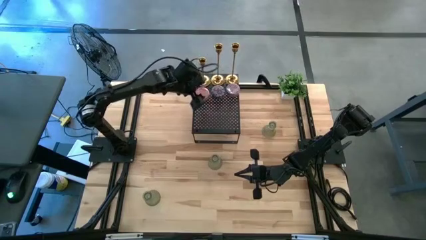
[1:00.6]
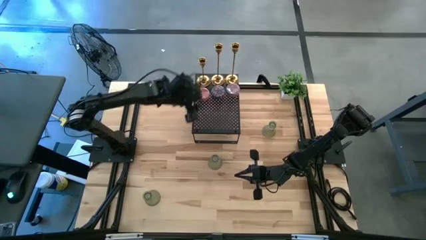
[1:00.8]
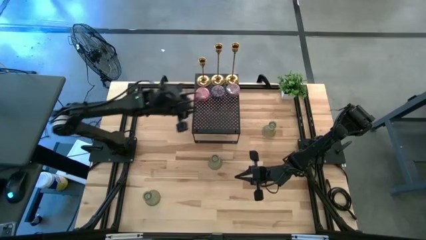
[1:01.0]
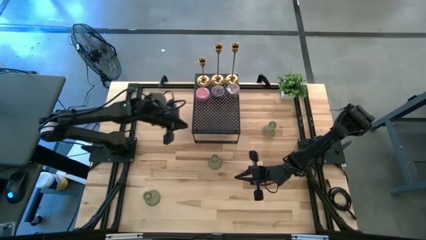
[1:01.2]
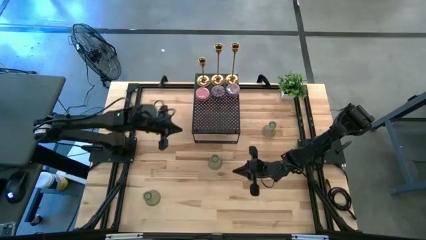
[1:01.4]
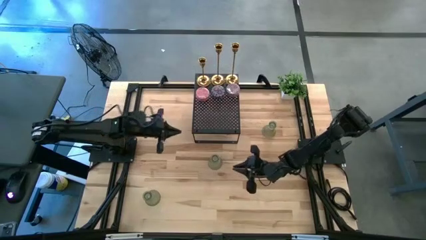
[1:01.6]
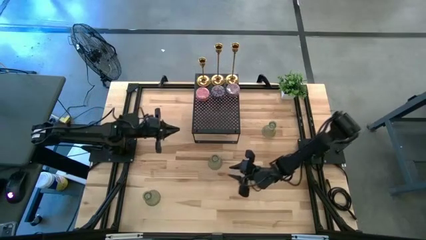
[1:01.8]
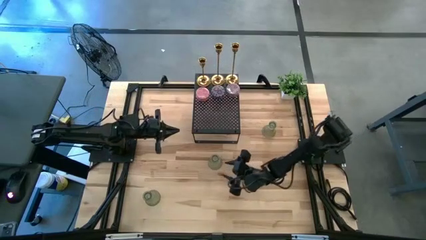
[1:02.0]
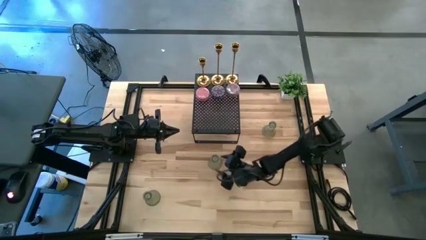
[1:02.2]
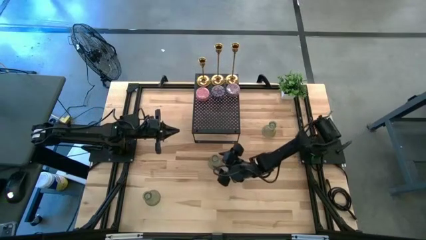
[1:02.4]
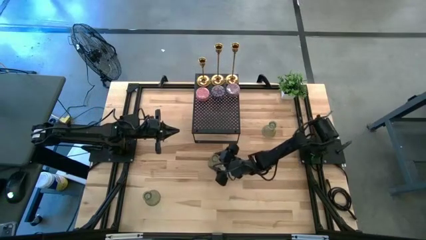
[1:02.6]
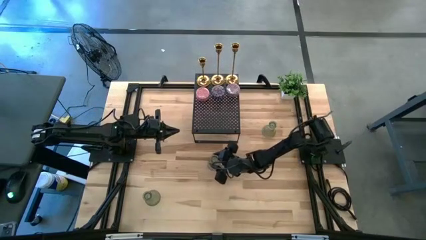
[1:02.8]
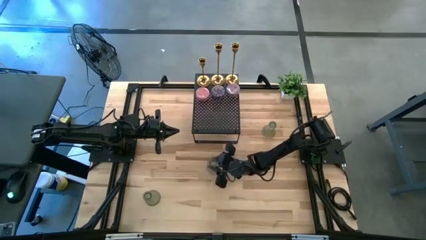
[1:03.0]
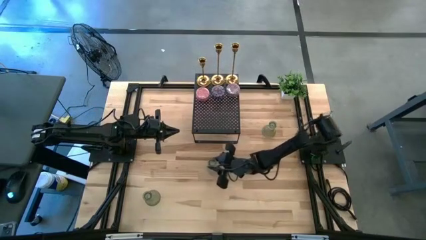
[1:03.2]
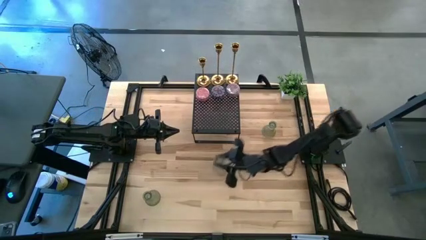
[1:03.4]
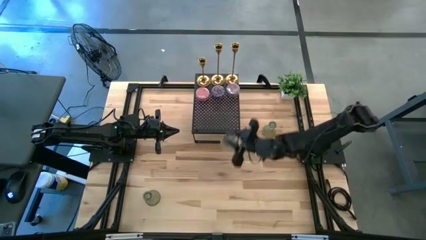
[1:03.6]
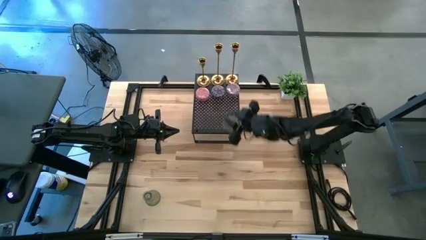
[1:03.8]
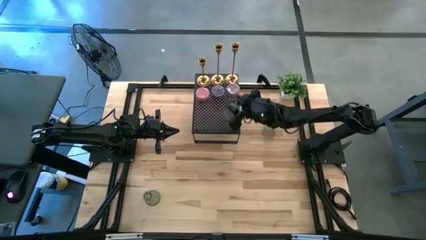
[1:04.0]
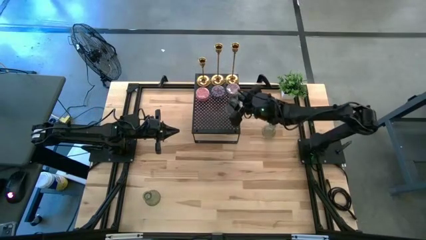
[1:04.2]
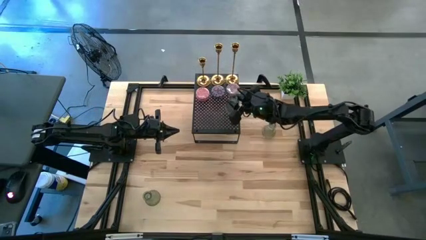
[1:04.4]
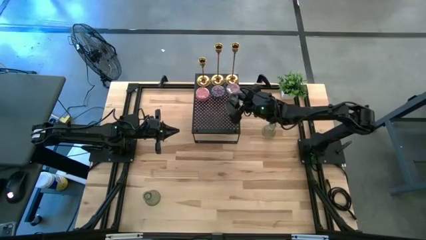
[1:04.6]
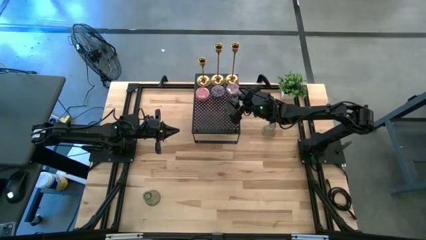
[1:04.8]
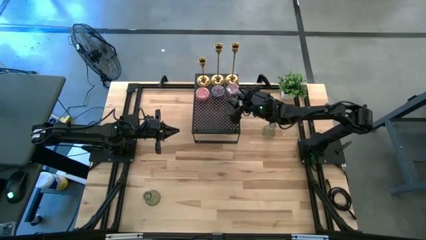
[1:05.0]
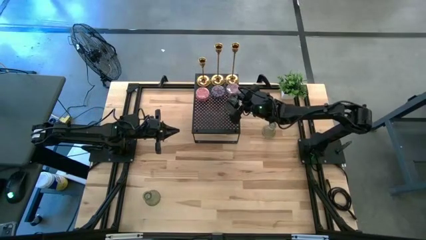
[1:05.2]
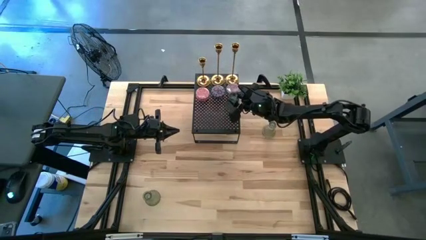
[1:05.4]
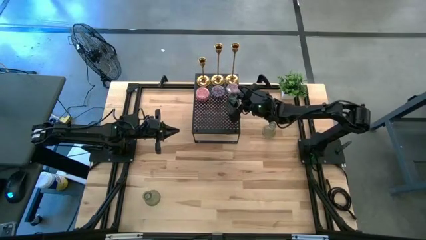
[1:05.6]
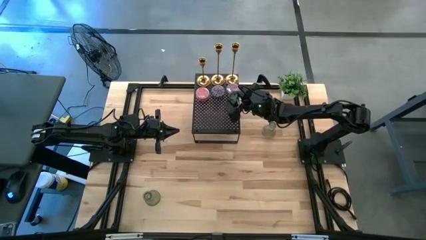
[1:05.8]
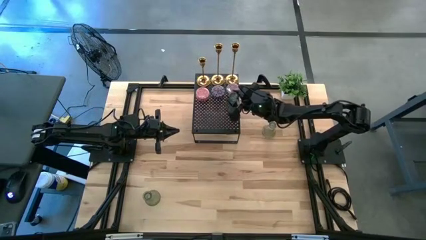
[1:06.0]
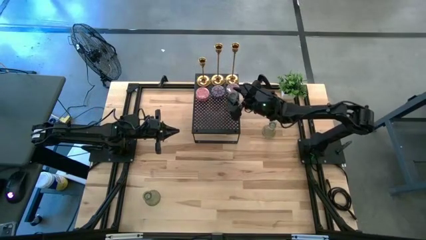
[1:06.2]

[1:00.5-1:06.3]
Task: Pick & Place candle stick holders
Put the middle green glass on the shelf

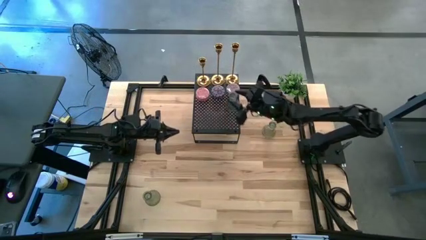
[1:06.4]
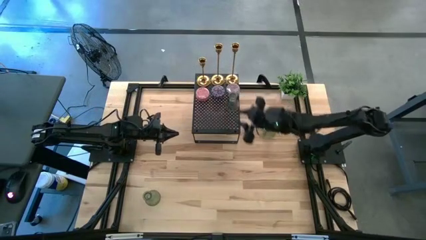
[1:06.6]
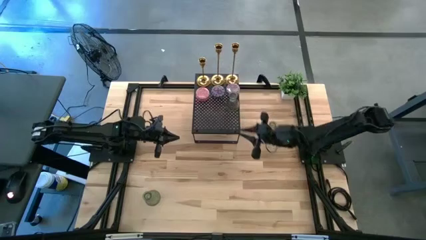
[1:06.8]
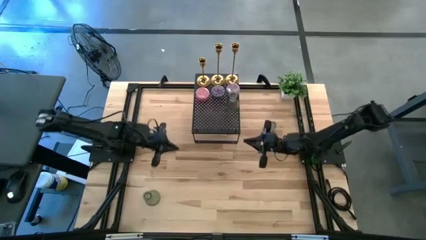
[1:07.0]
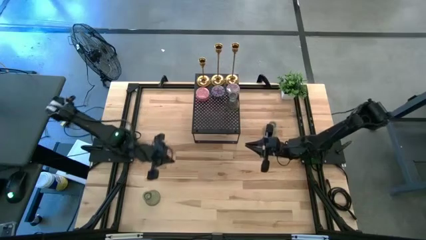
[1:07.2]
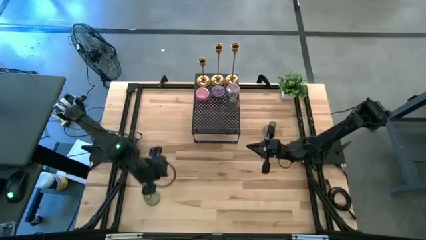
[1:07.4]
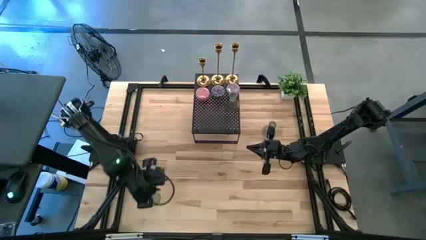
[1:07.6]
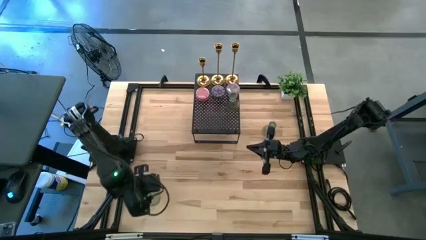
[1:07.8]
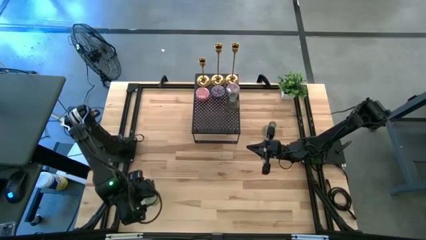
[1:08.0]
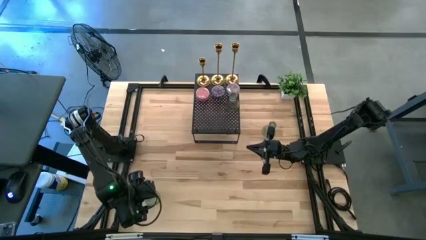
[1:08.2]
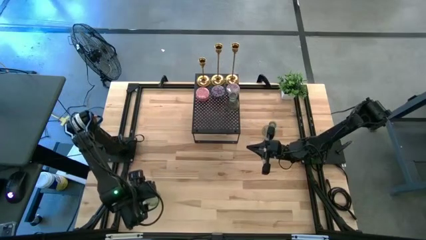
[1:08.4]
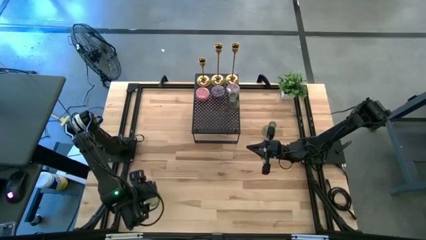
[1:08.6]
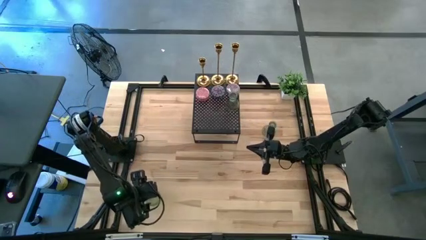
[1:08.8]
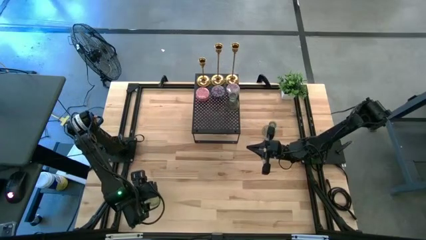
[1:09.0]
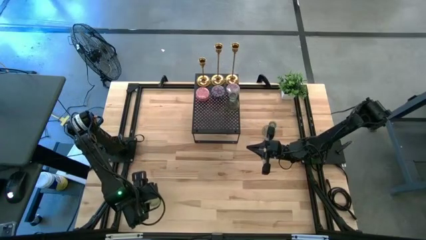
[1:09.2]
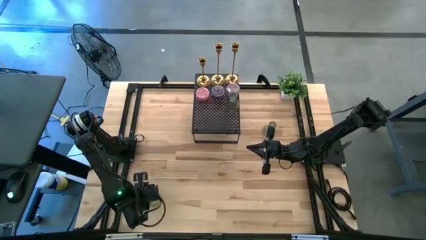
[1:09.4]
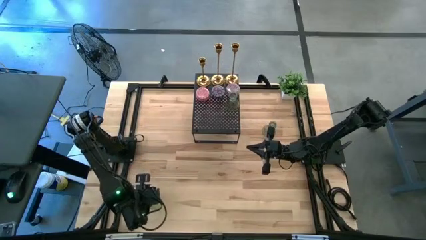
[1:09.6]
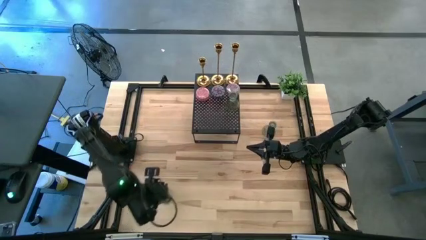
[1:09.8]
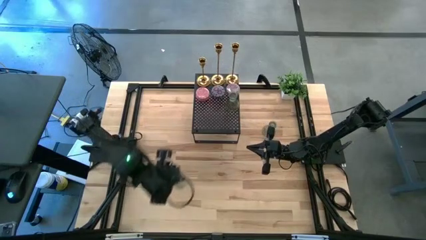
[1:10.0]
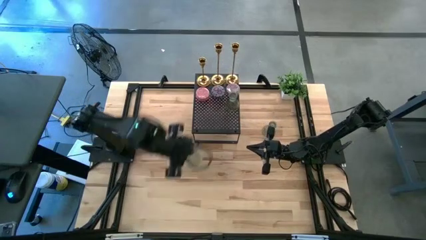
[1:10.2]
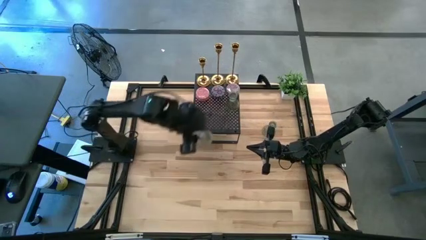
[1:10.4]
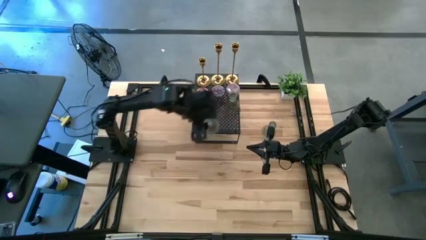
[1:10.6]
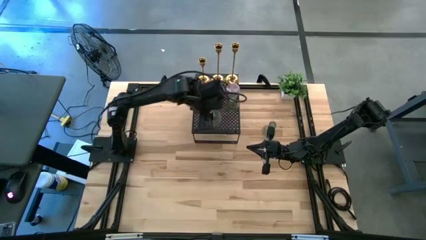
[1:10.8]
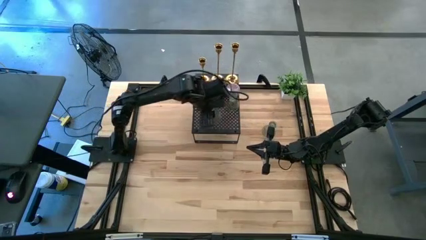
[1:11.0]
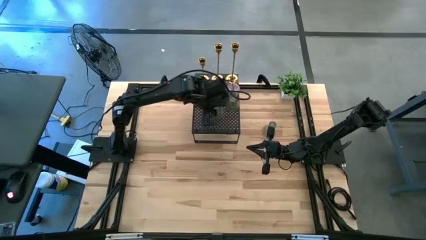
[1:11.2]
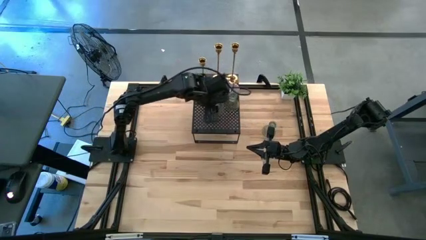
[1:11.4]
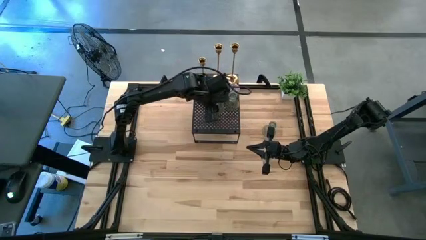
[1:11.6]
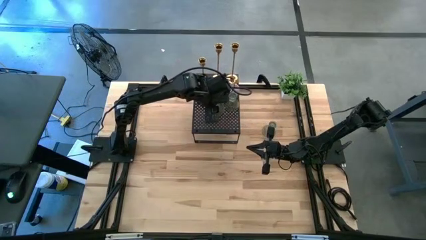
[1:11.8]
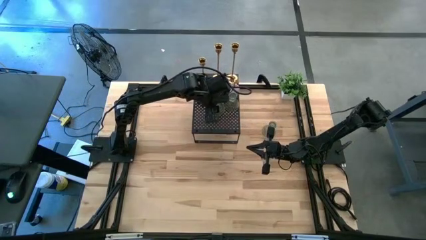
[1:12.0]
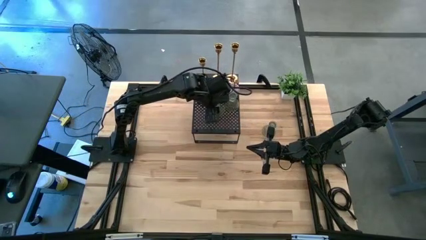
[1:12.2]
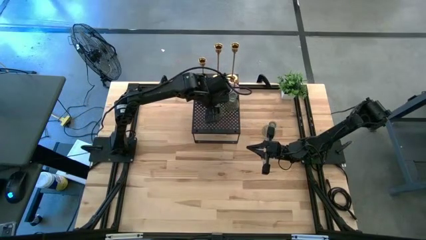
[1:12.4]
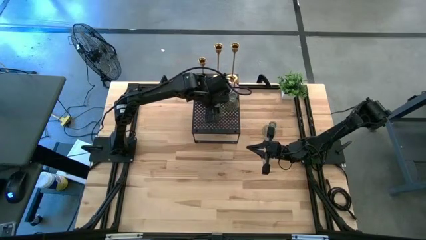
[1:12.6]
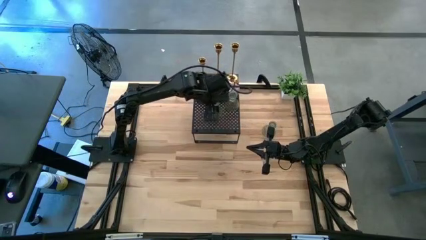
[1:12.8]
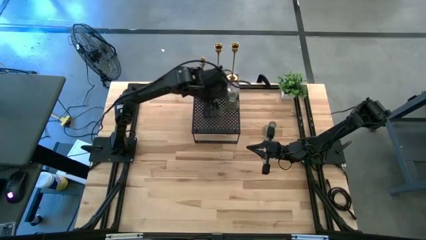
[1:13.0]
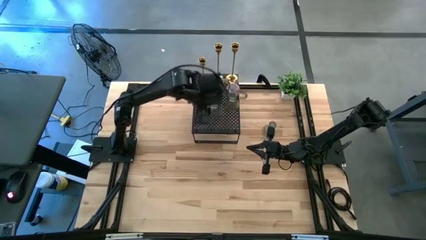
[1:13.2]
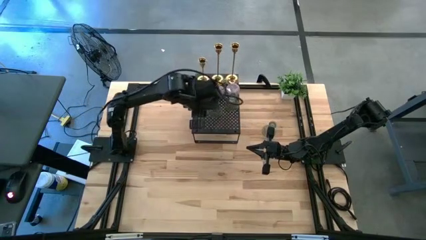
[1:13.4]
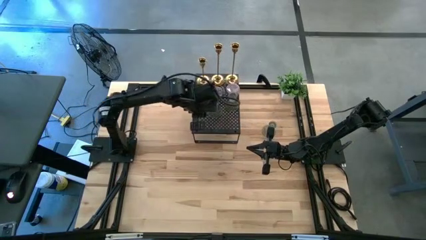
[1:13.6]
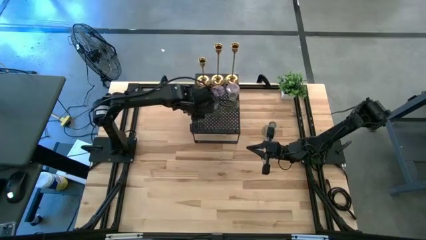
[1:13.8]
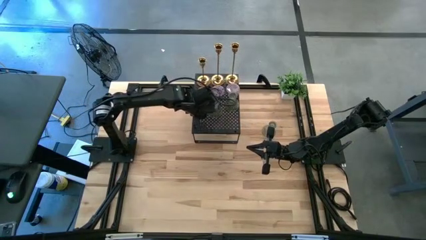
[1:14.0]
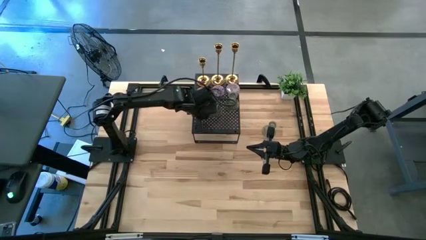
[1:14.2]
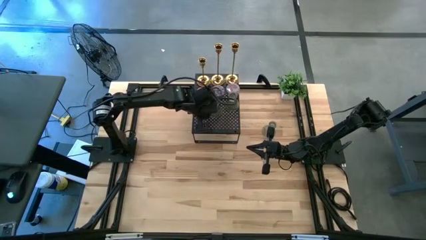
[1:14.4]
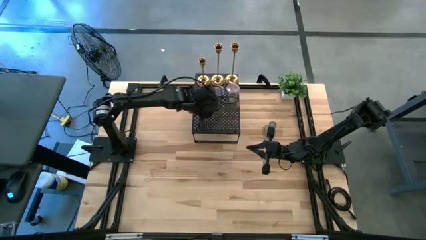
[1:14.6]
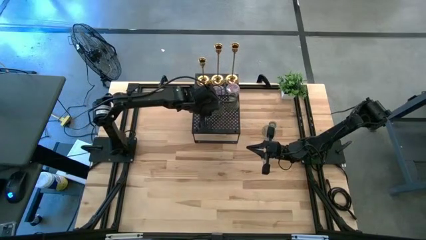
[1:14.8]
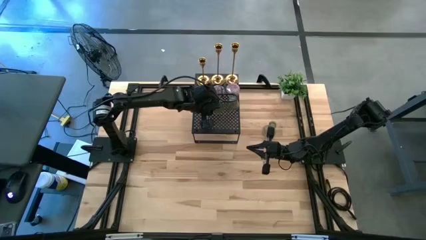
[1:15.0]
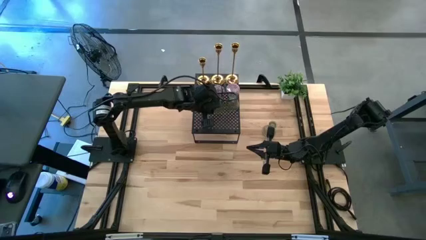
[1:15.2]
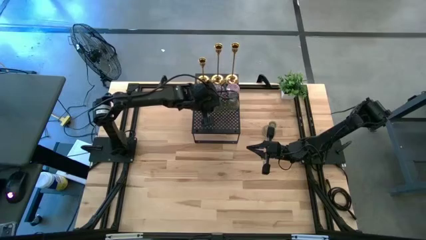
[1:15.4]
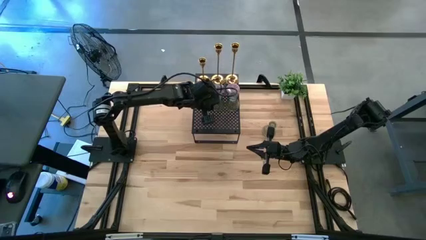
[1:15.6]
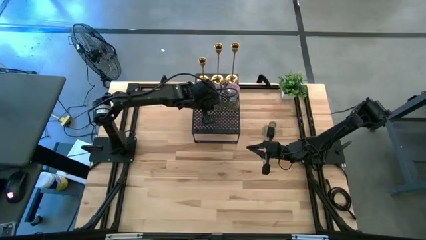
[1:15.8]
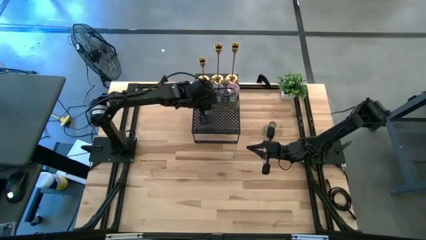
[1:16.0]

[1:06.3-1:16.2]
Put the bottom green glass on the shelf
